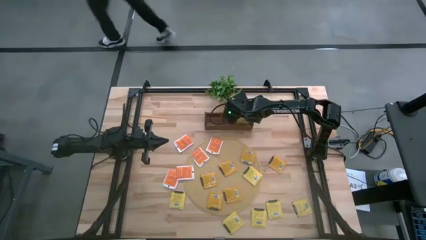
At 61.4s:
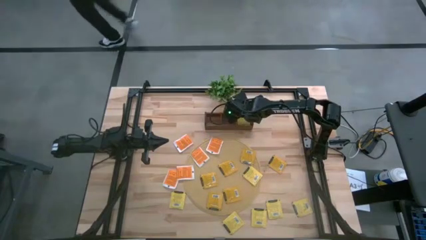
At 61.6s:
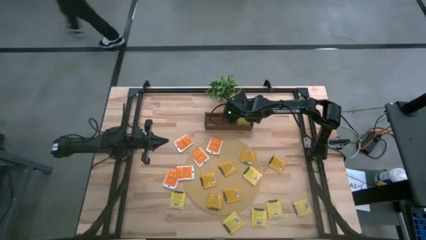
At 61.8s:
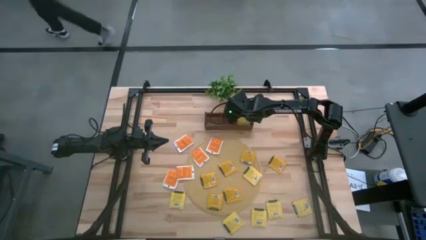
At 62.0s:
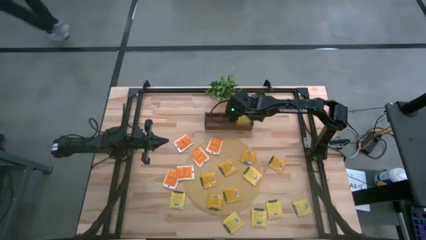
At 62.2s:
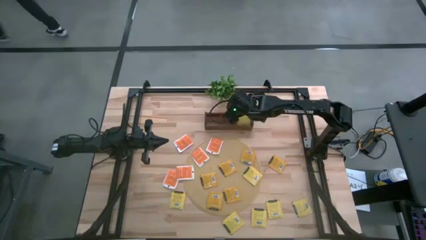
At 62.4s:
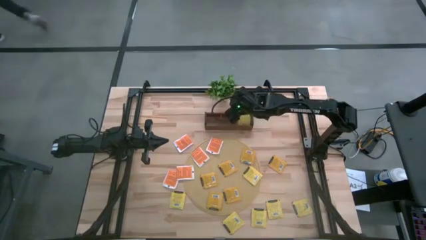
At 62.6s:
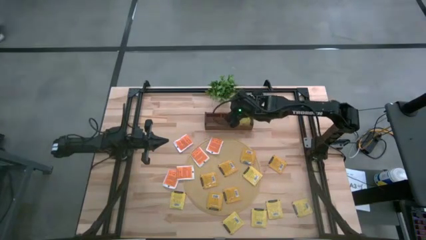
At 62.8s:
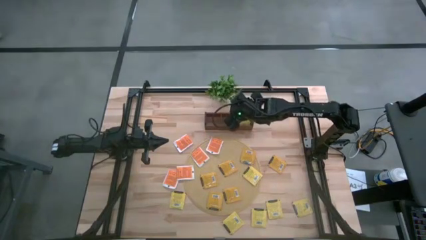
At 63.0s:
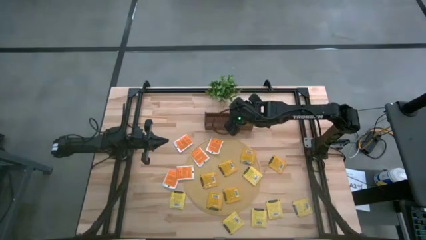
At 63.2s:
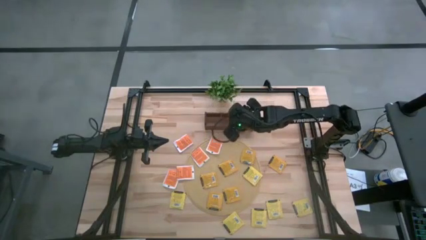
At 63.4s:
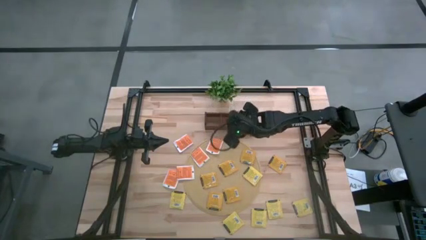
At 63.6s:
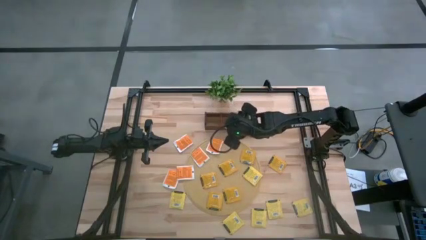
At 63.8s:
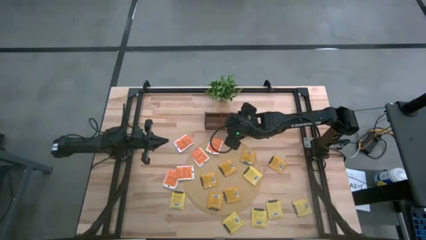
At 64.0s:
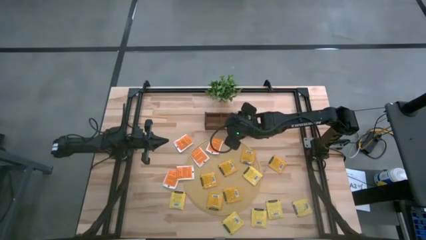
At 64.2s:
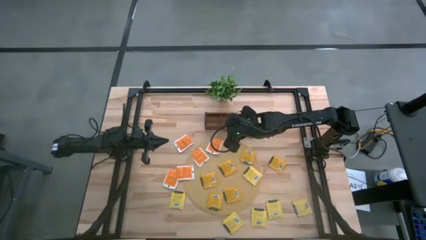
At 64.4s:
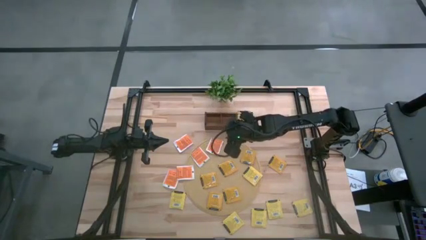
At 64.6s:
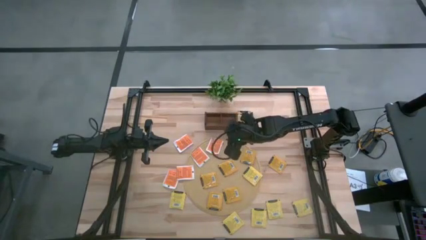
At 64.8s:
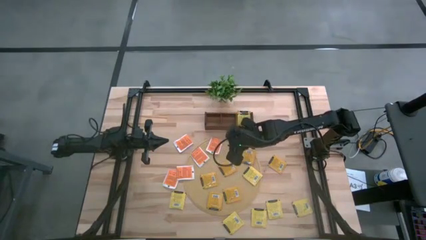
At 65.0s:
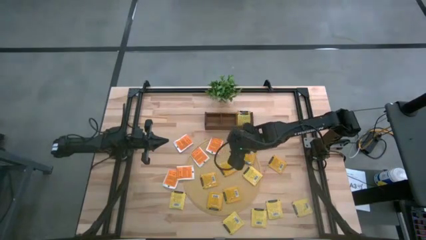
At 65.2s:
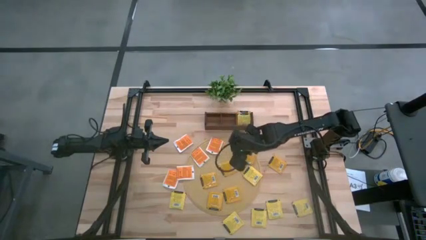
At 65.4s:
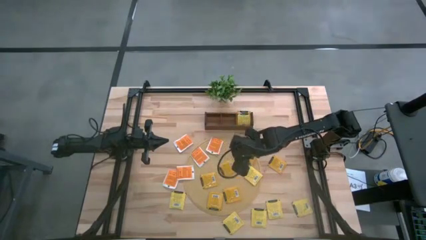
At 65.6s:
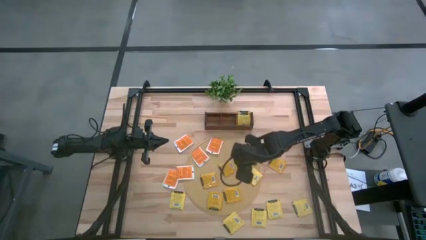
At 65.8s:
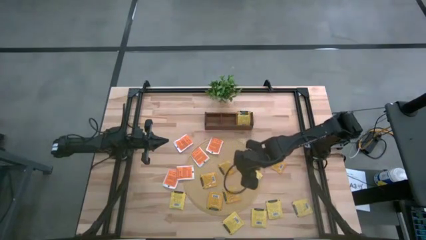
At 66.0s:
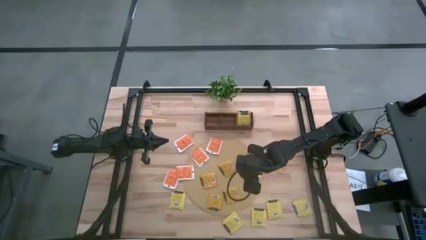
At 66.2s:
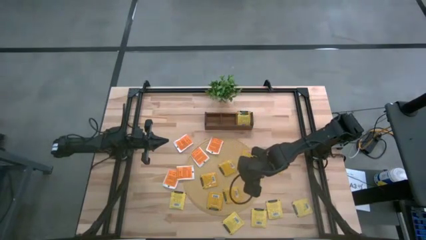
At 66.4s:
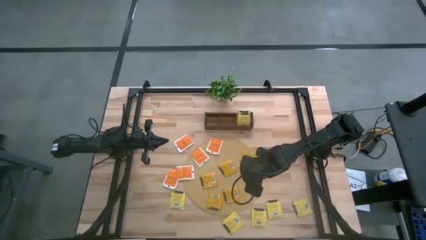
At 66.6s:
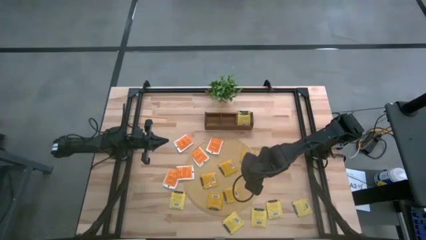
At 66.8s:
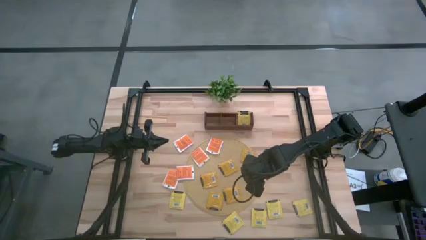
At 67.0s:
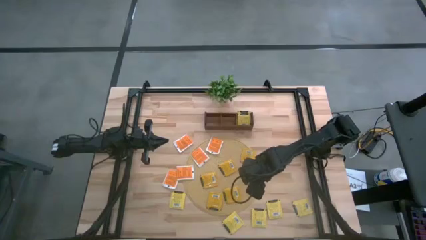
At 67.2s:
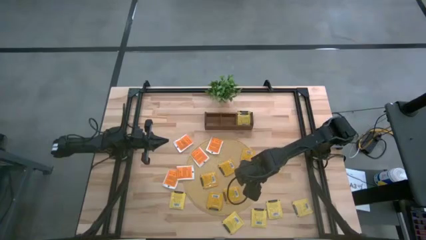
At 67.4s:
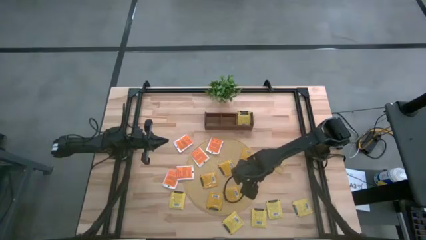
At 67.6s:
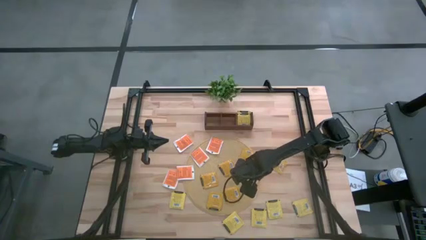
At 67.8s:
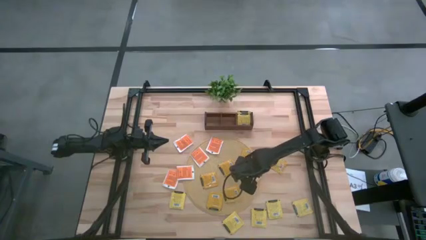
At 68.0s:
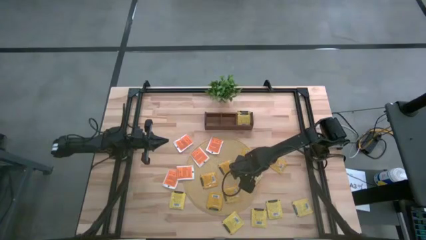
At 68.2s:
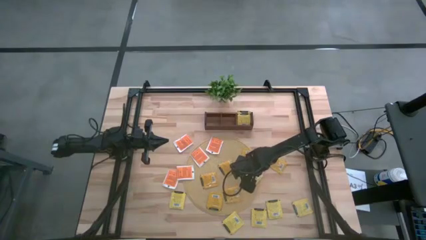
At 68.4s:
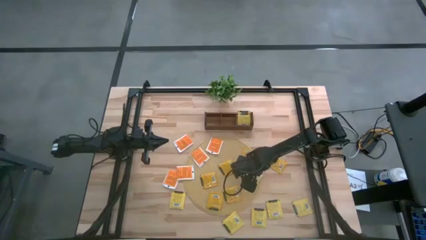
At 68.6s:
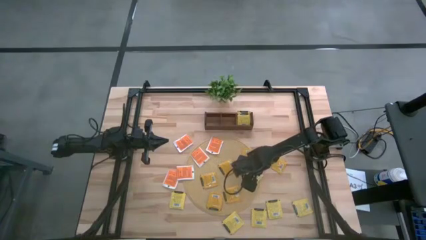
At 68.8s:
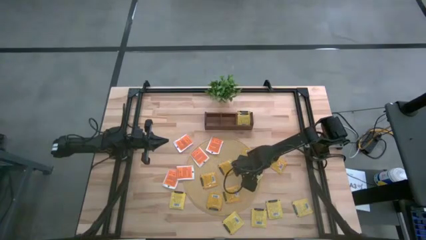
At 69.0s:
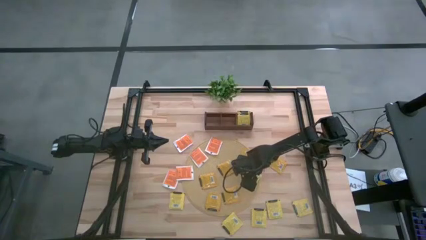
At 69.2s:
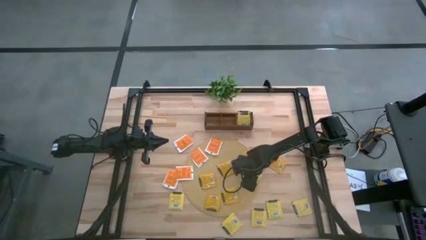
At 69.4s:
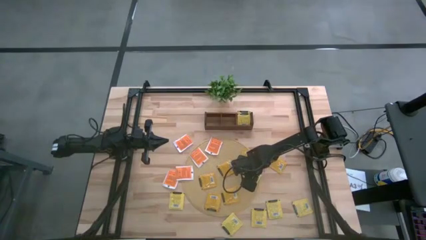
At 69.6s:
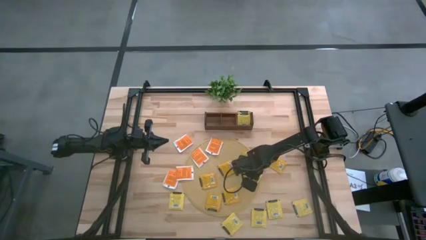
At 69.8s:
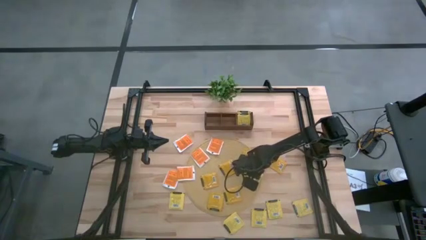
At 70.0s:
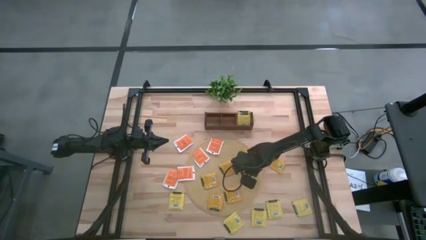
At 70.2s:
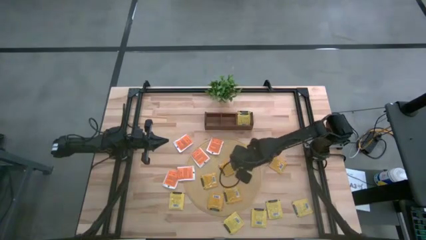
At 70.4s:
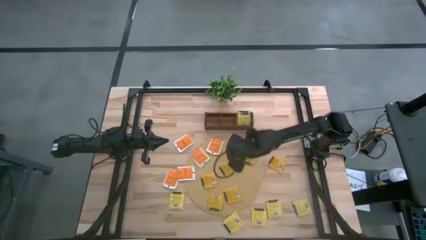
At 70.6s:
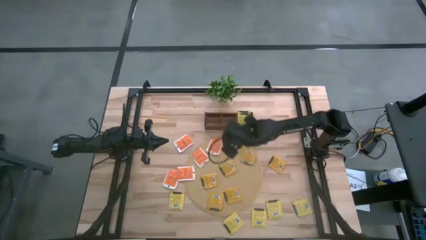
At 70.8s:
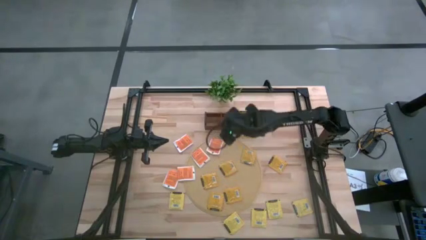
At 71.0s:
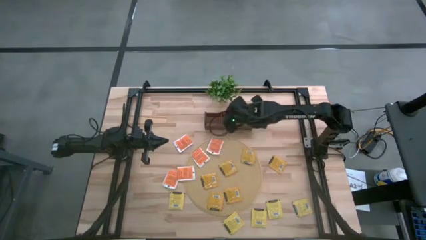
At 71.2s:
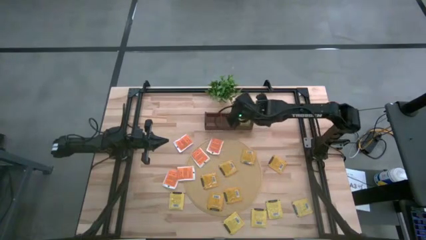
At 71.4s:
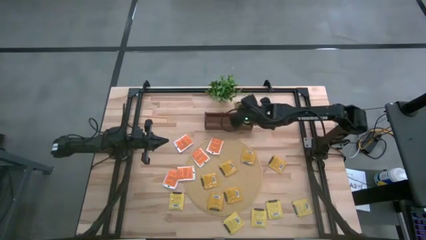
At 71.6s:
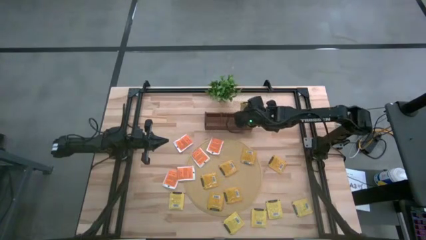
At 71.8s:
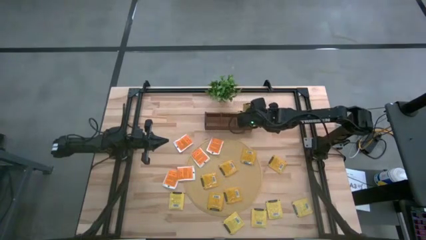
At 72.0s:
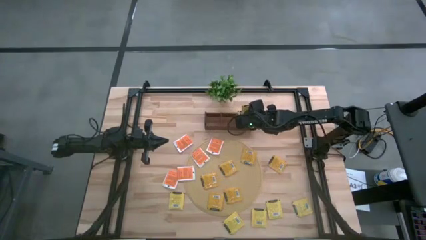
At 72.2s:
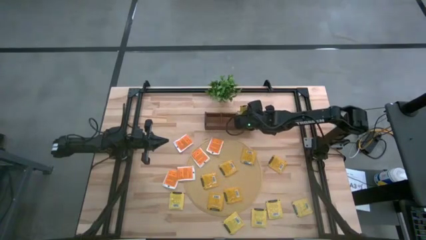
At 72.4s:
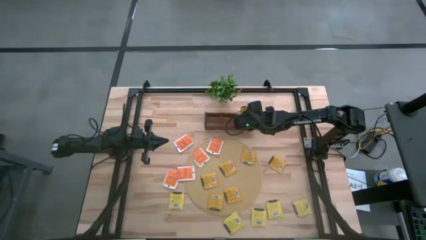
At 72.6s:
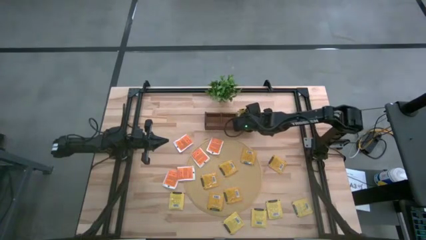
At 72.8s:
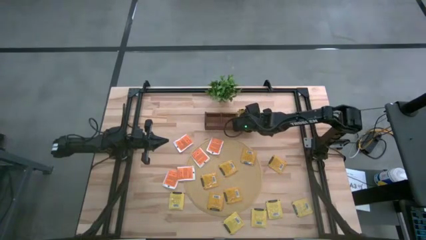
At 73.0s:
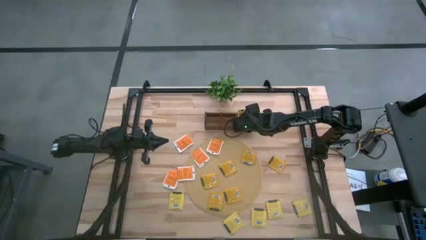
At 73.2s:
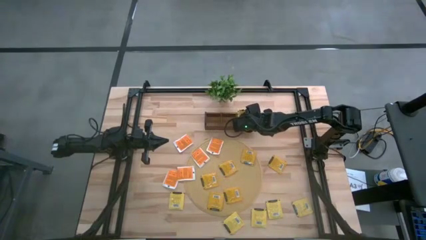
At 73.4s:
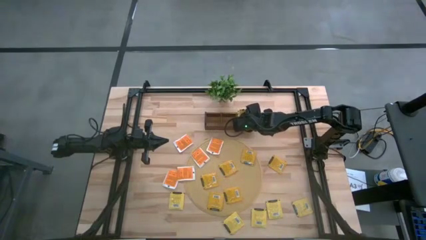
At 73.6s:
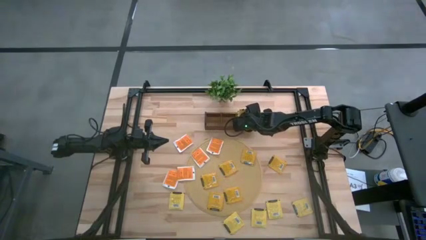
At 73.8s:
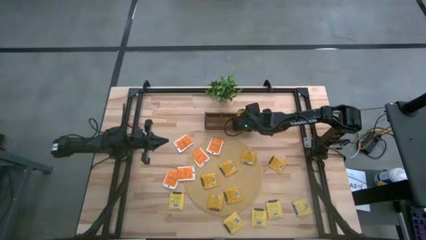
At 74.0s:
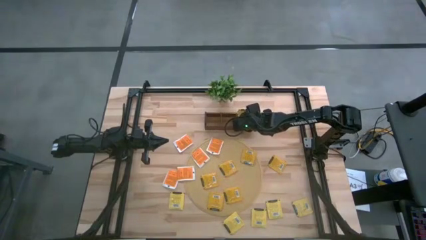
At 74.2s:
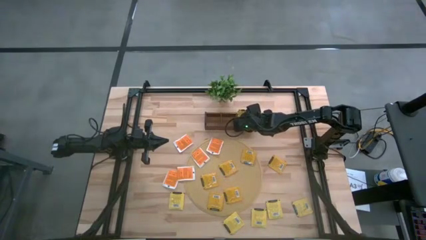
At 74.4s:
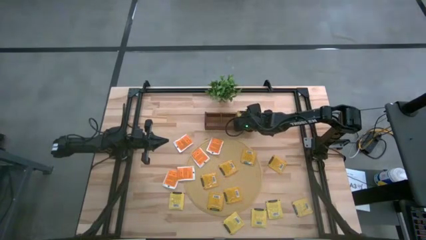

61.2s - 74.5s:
Task: Pick & Place Tea
Put the yellow tea bag into the right section of the wooden organizer

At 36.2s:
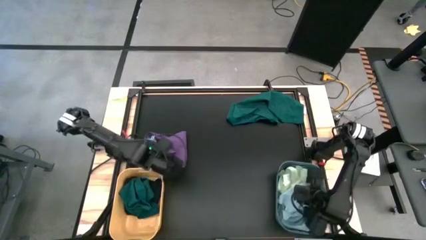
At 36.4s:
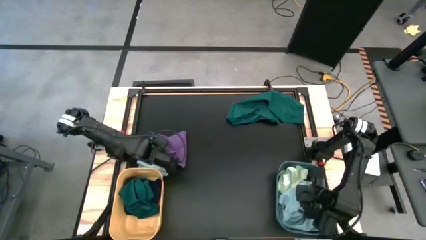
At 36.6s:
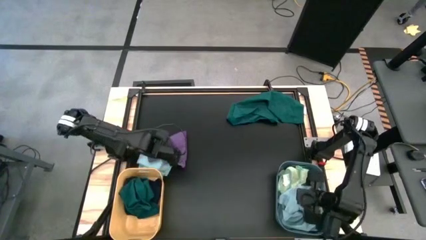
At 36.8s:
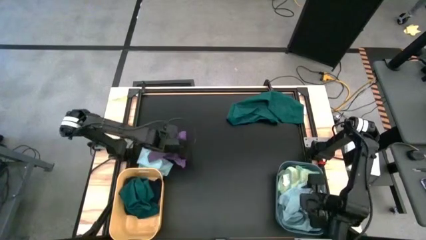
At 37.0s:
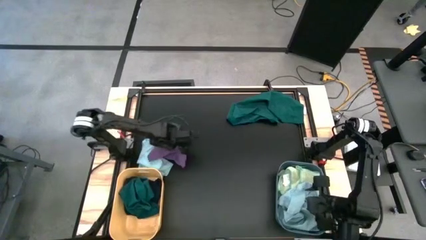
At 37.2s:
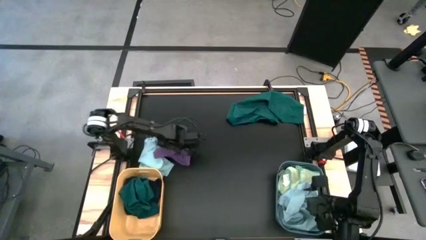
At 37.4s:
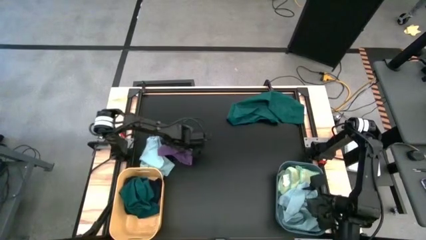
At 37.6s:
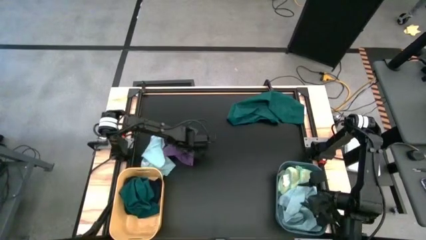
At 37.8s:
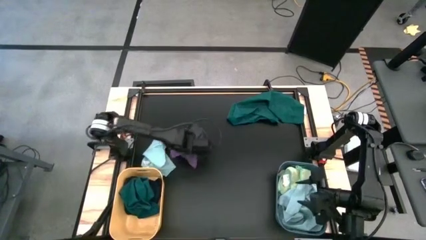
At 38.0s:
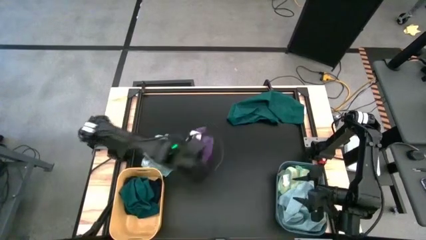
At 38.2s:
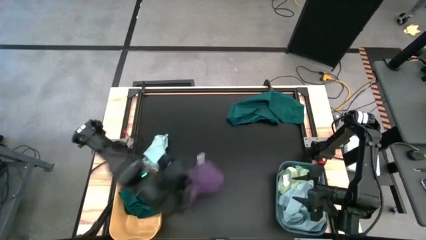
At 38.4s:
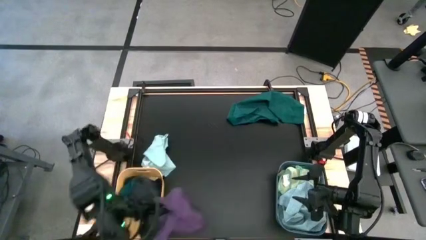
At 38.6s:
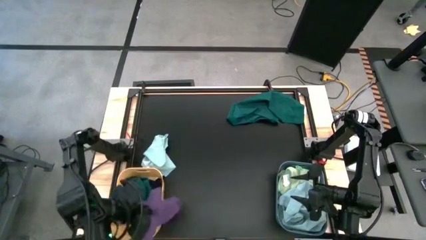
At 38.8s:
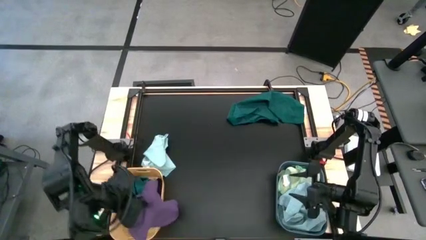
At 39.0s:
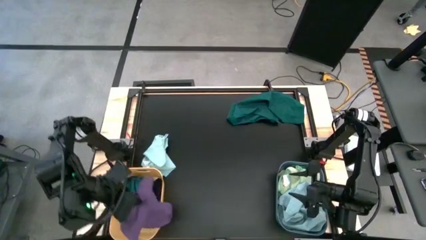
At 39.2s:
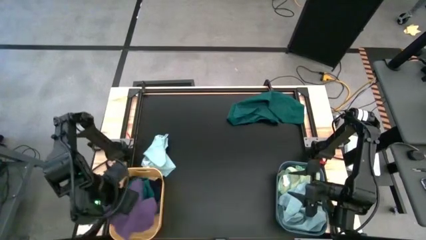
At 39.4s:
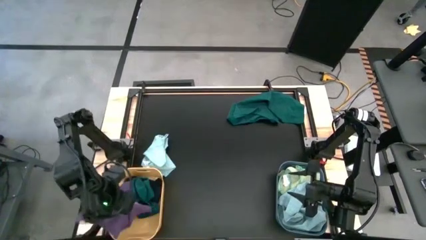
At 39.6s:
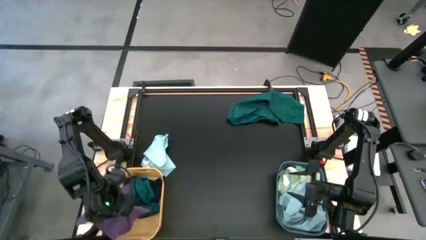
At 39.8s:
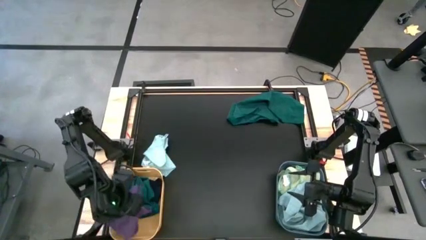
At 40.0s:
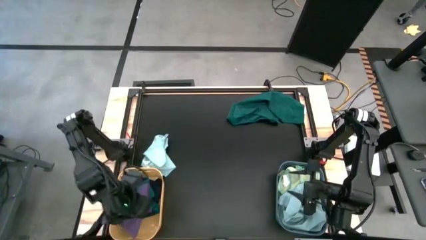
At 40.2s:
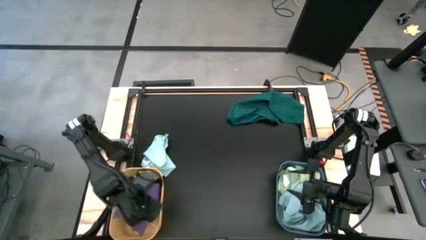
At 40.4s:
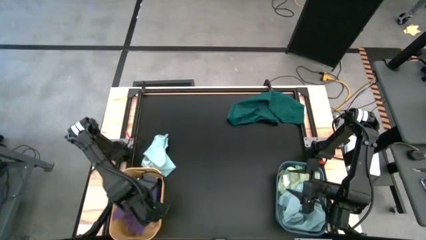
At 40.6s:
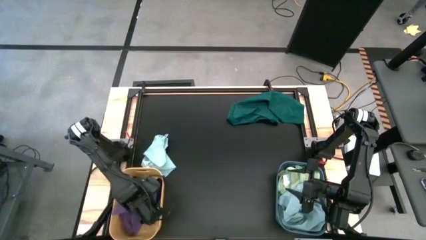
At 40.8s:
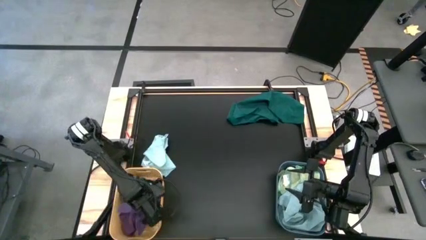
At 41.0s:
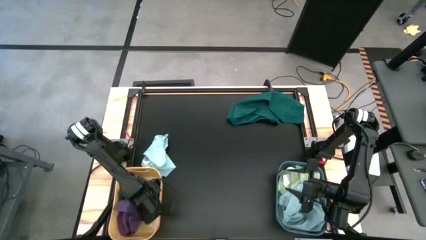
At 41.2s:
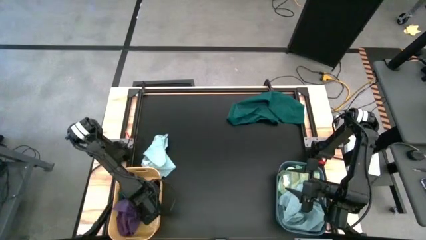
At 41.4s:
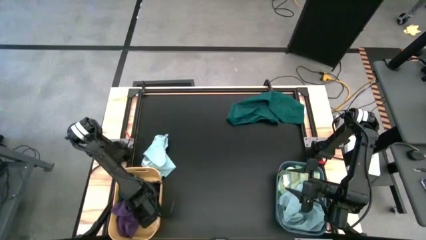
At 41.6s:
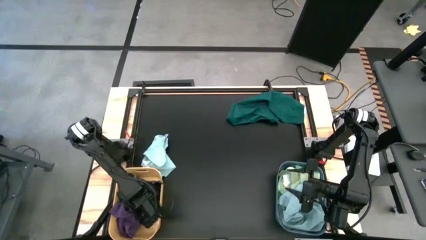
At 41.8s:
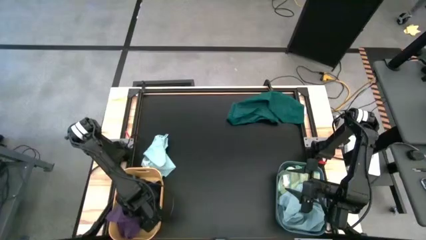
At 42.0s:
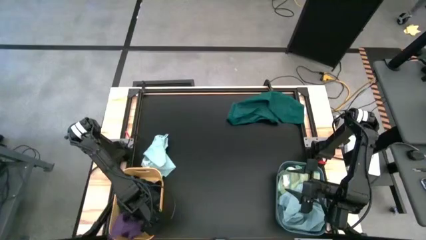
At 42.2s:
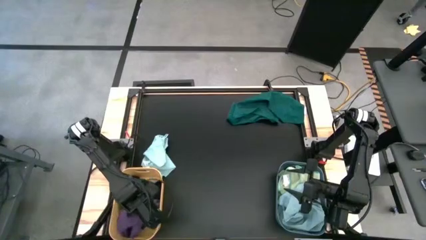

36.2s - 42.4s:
Task: Sort microfiber towel by color & place in baskets
Put the violet microfiber towel into the yellow bin
